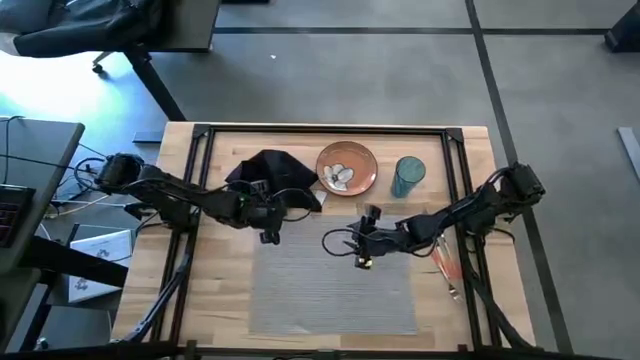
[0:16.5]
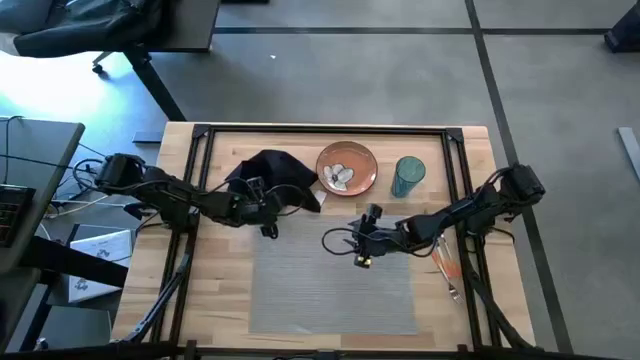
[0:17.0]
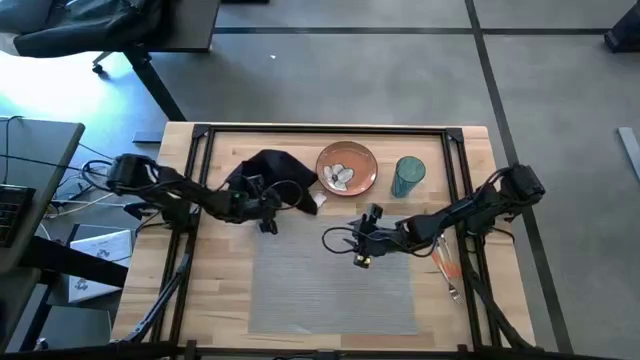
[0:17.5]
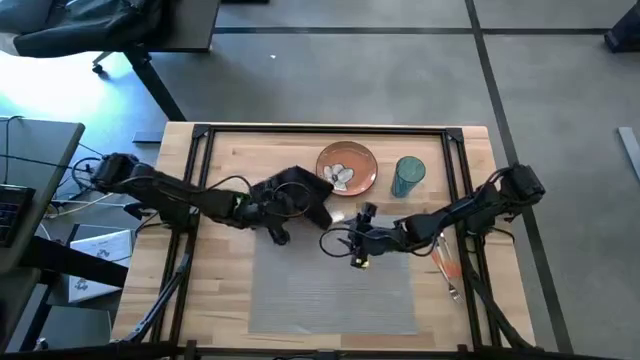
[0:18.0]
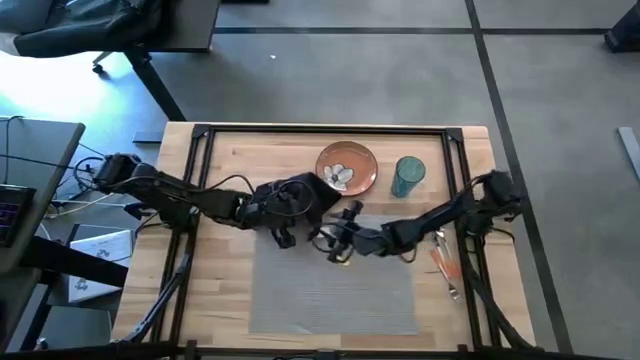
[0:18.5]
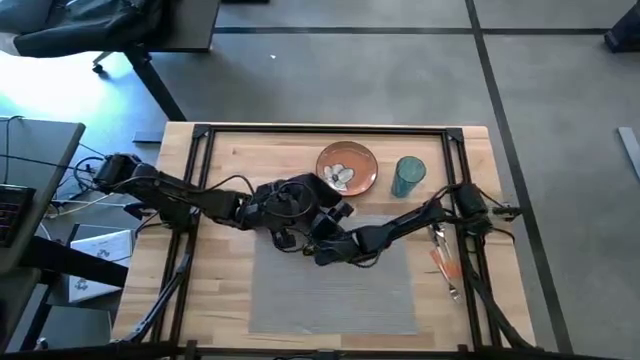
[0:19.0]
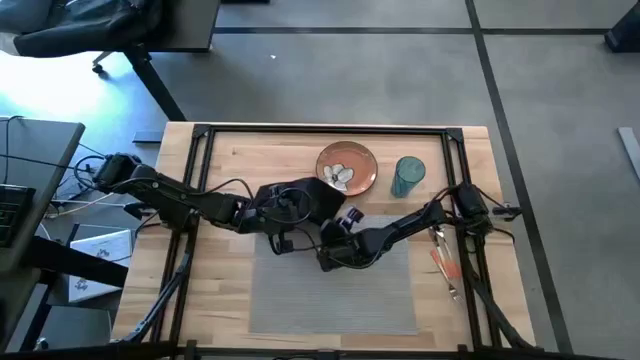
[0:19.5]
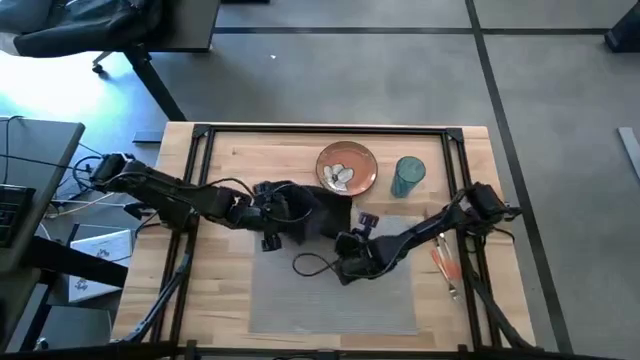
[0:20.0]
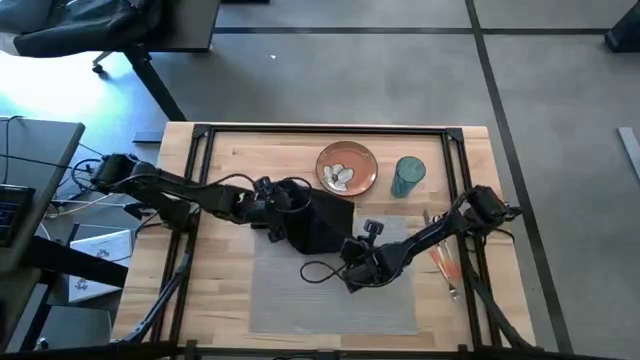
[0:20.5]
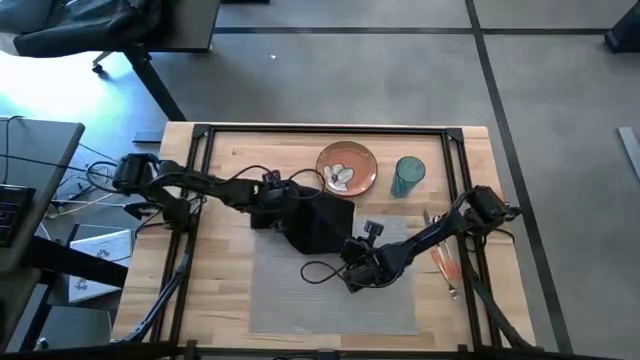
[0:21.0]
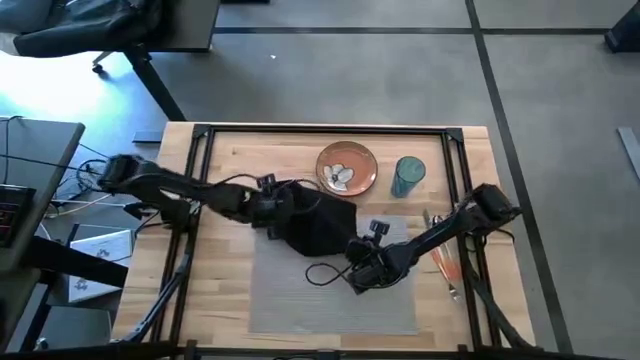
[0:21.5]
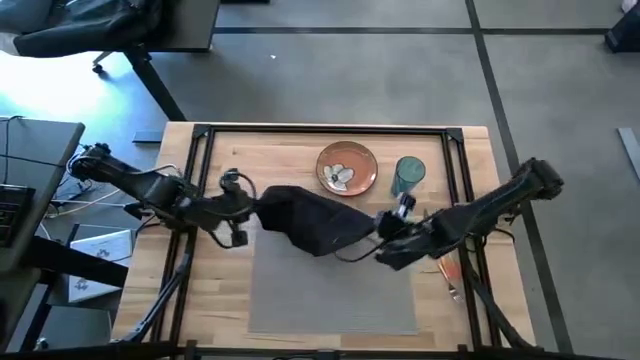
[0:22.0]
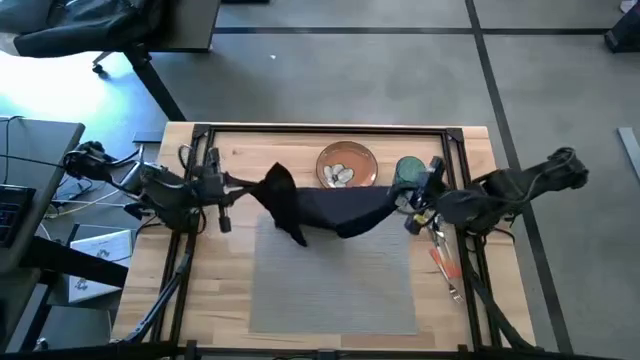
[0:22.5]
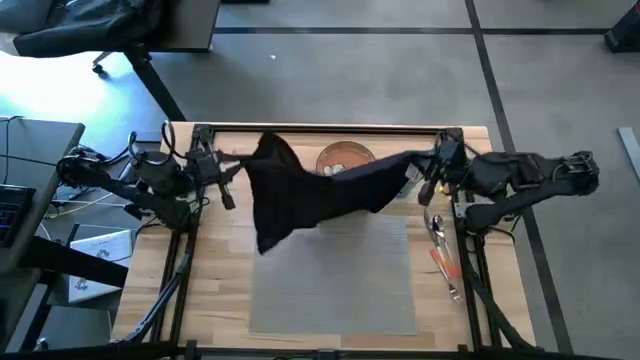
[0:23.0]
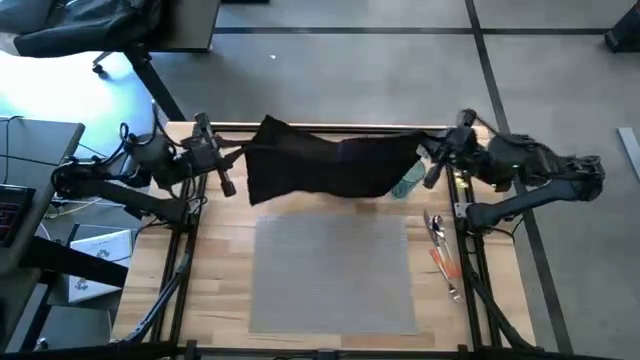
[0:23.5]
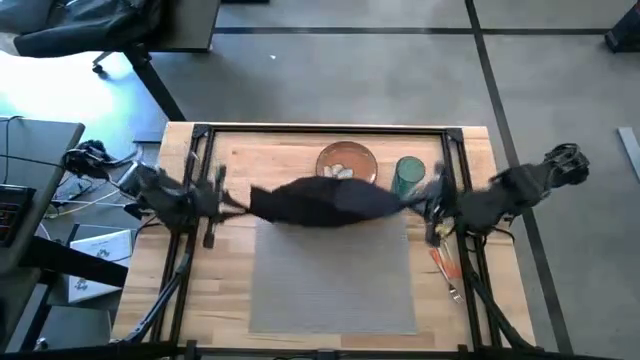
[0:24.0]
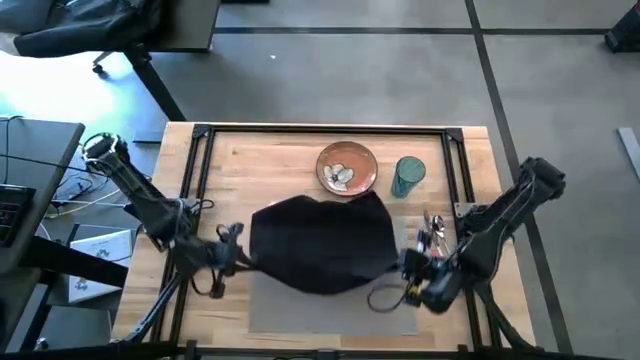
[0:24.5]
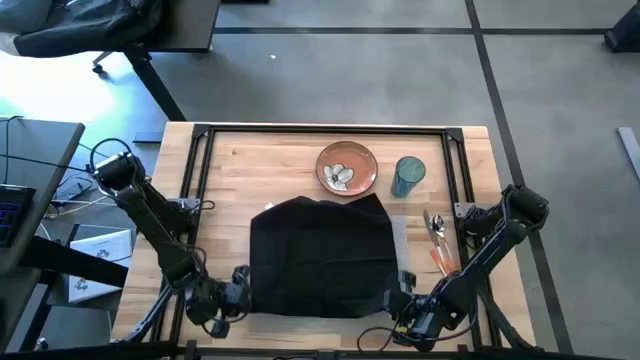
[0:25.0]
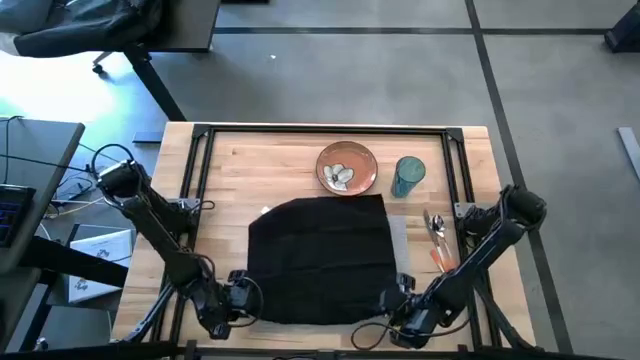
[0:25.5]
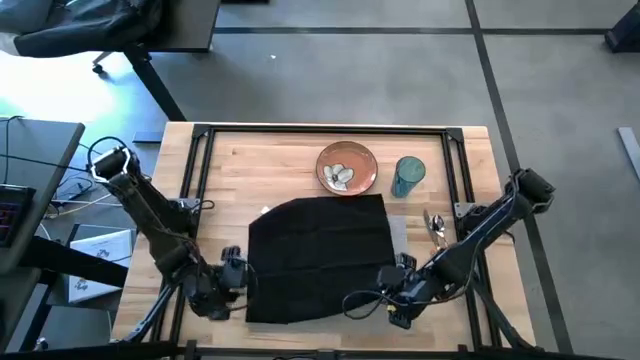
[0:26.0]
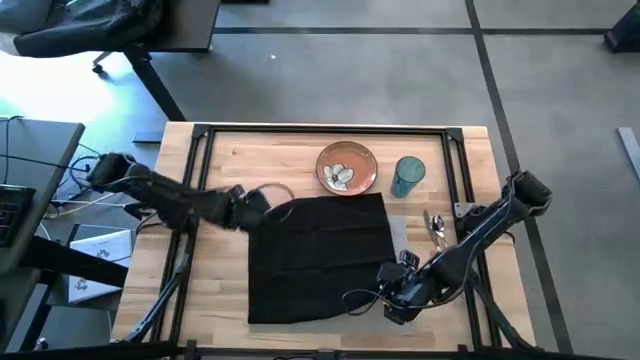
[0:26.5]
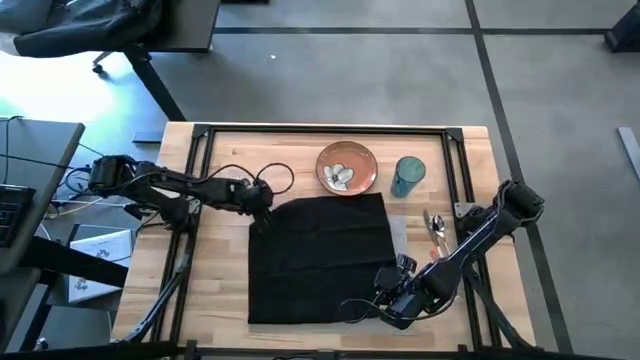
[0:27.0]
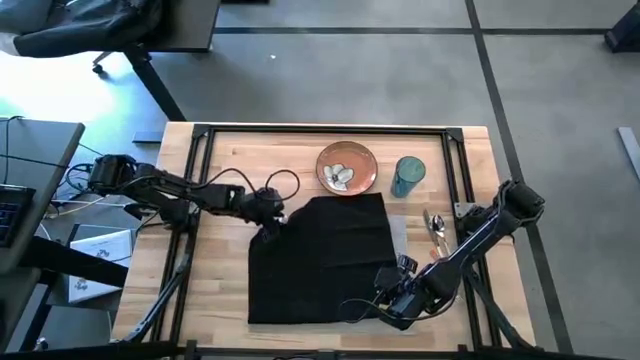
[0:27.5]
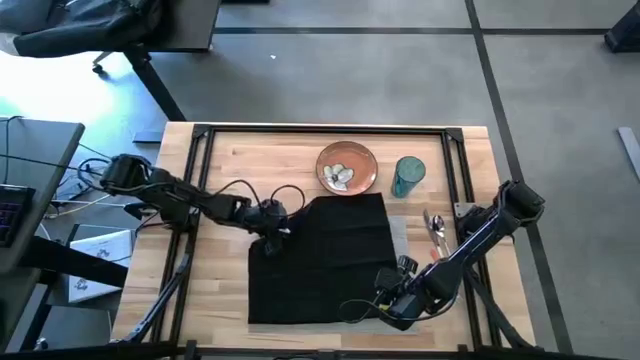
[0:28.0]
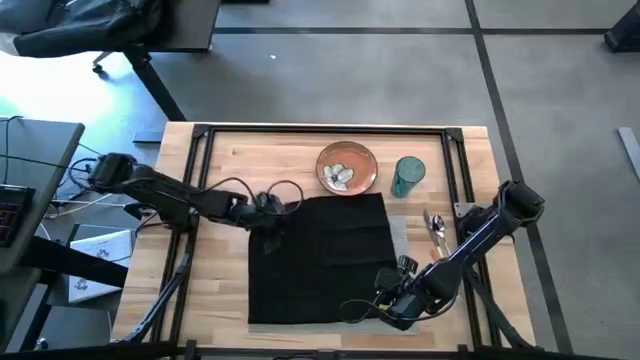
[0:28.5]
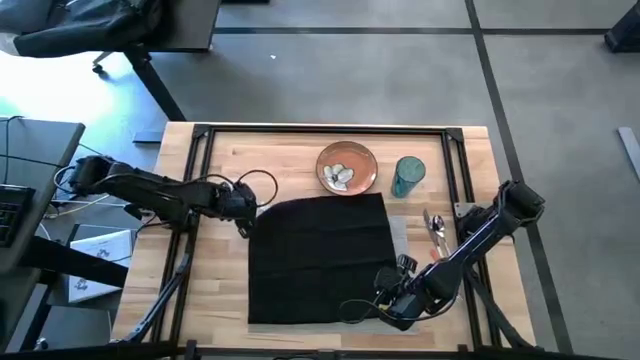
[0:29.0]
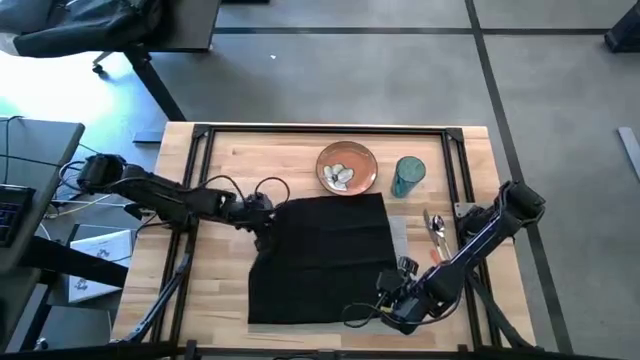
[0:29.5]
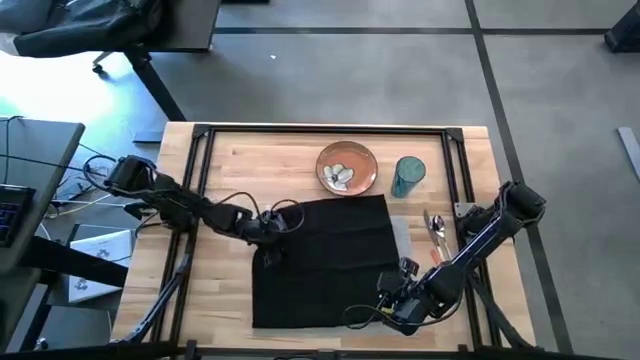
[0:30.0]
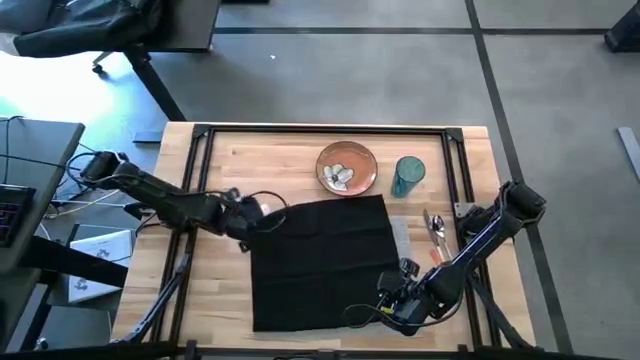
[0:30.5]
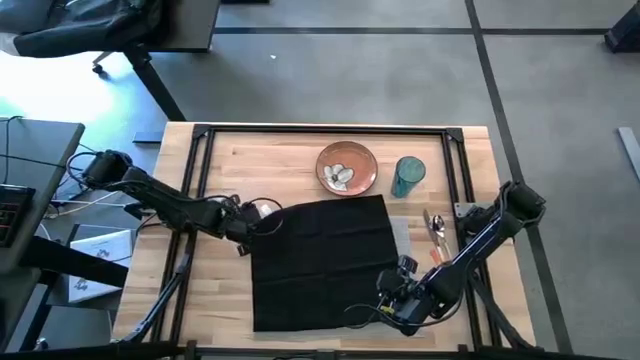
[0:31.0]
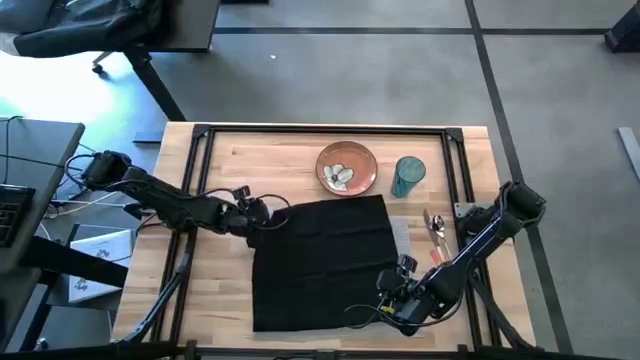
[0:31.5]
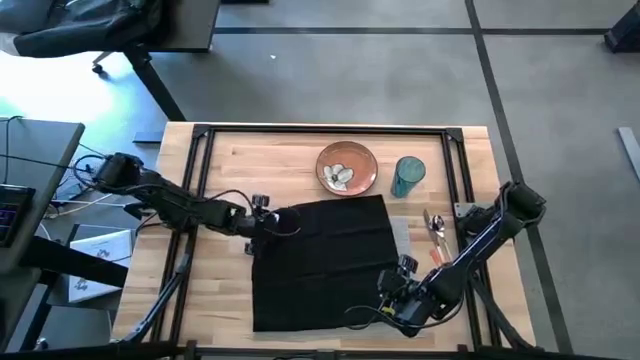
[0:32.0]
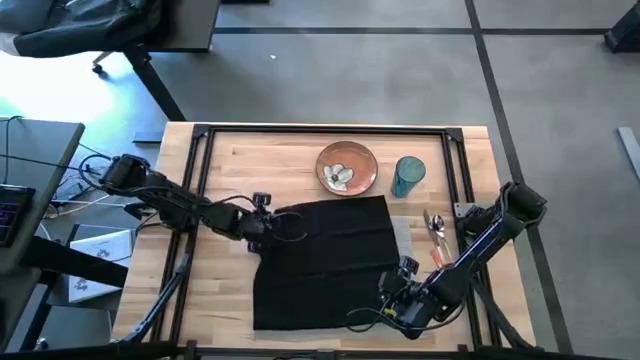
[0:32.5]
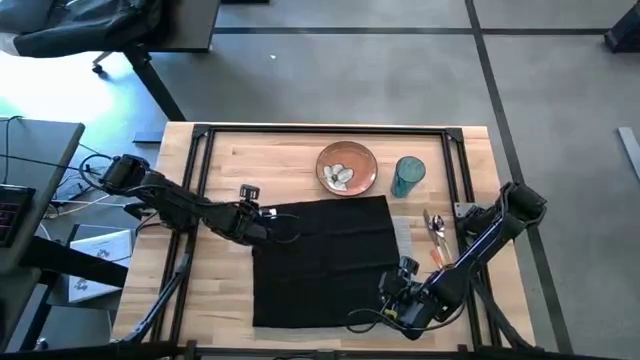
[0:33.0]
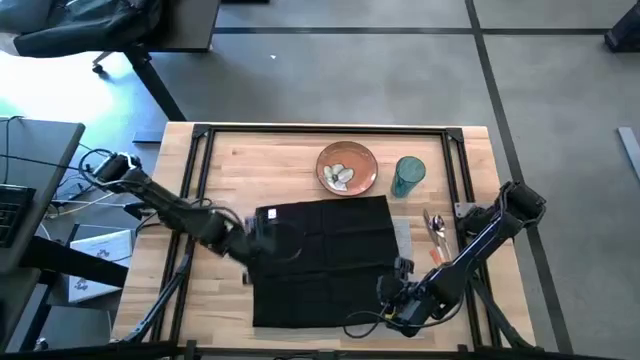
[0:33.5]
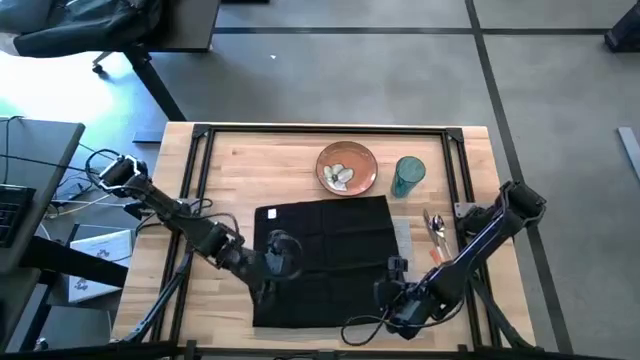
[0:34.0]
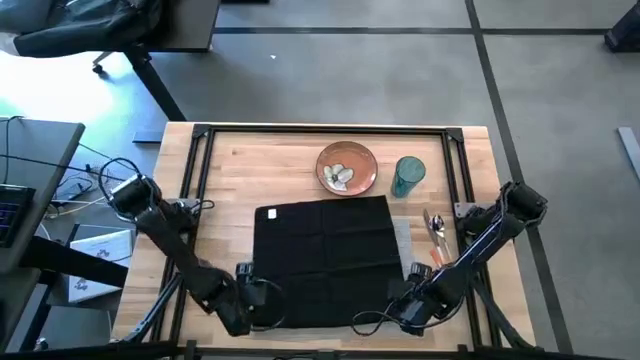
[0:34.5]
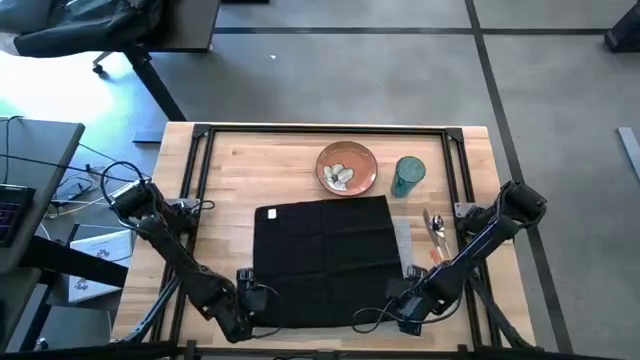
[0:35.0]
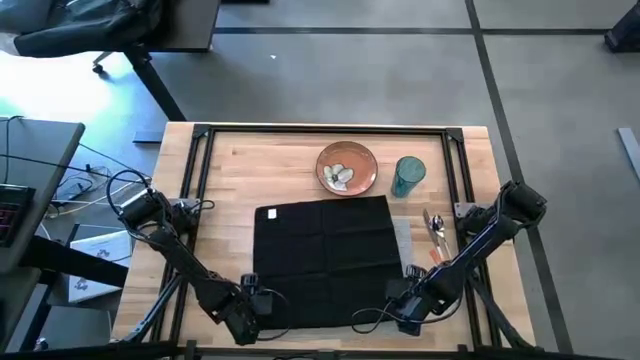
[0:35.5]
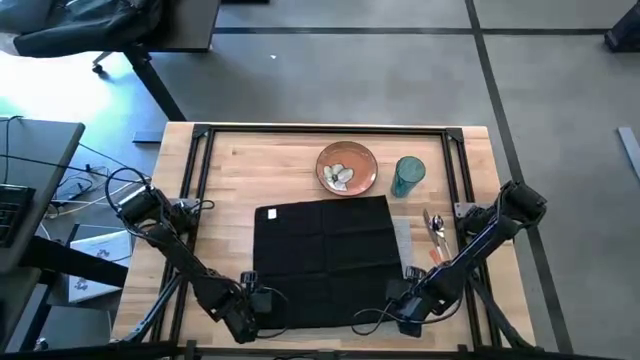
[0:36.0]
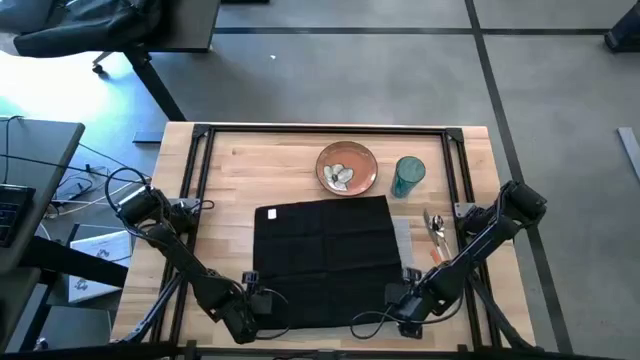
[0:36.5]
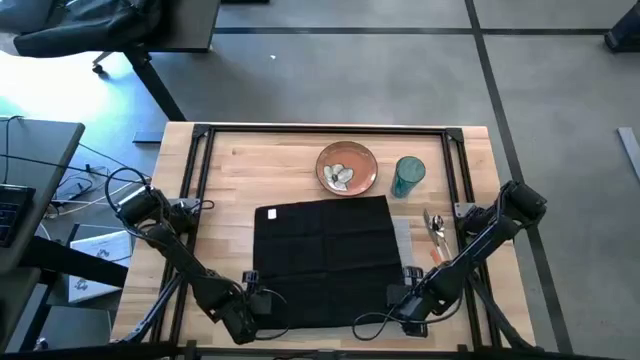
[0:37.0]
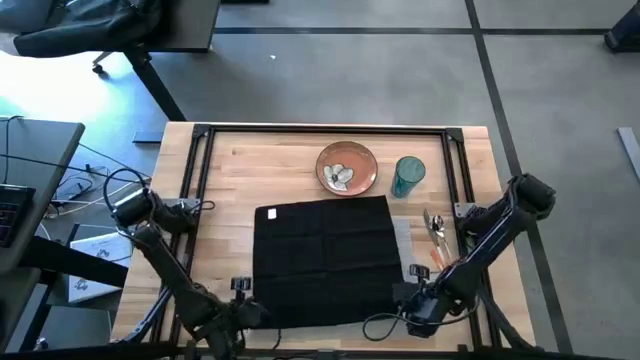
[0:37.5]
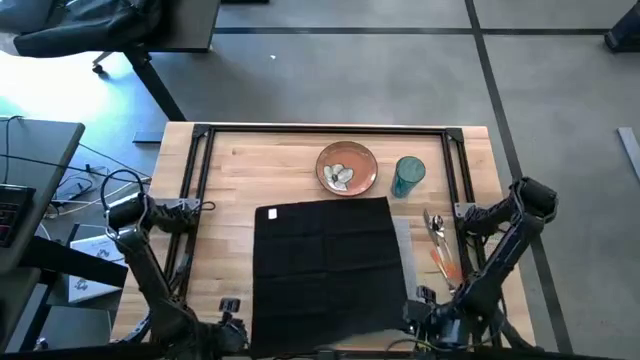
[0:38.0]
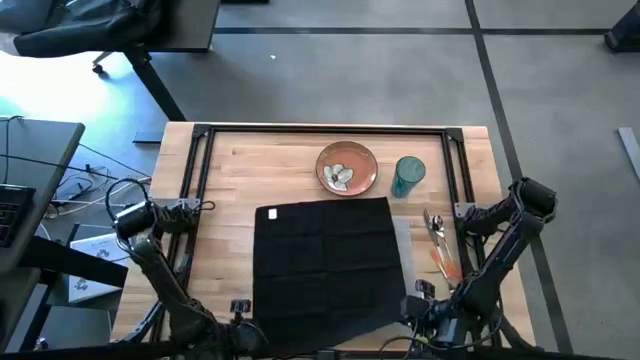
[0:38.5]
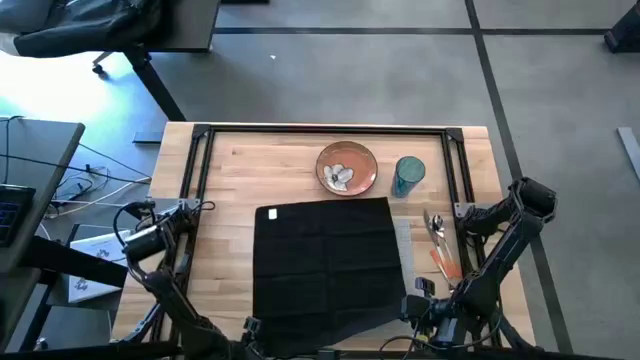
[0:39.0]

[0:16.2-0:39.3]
Task: Set table place
Fold the black table napkin on the gray tablemat
